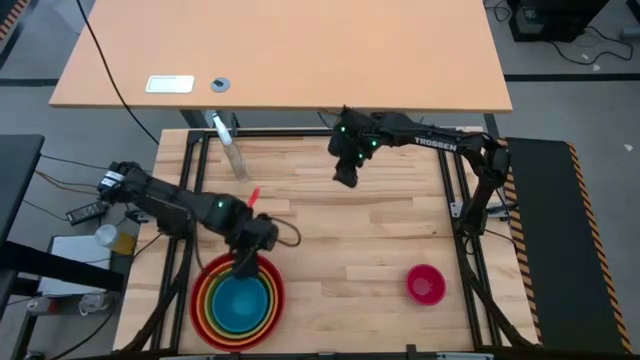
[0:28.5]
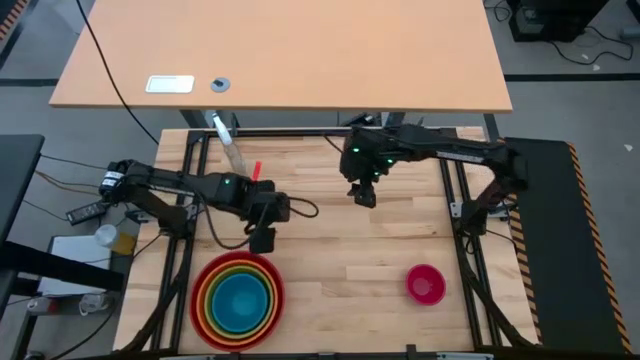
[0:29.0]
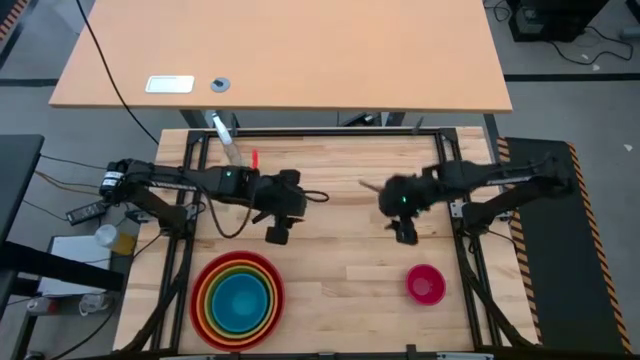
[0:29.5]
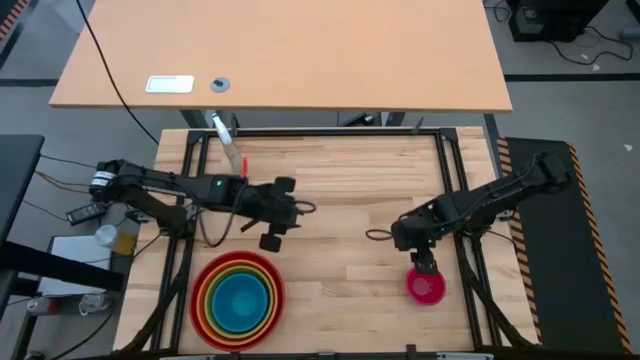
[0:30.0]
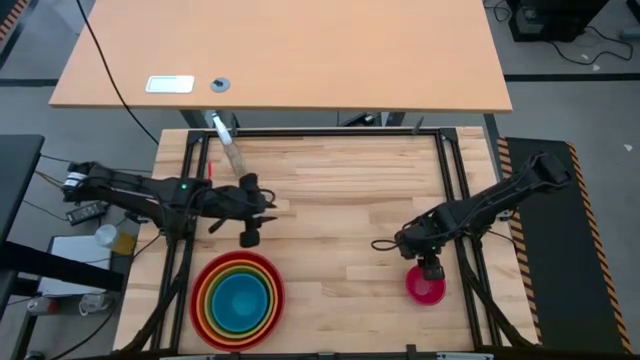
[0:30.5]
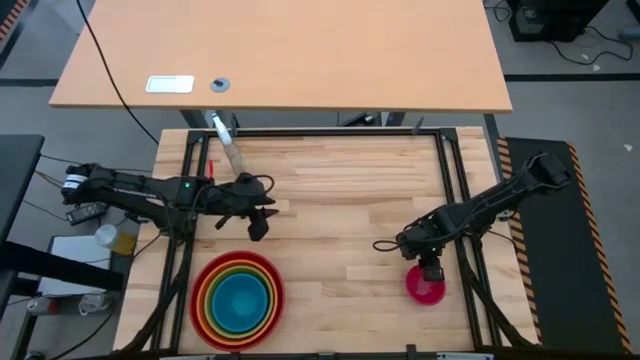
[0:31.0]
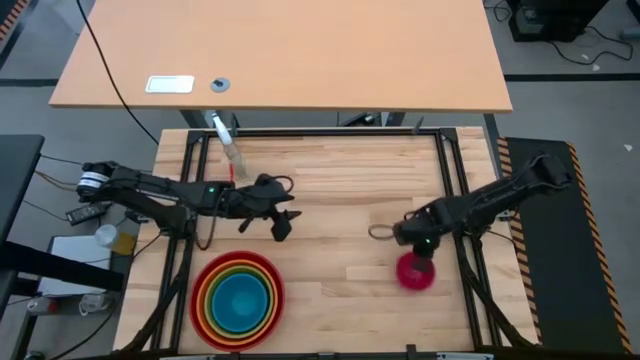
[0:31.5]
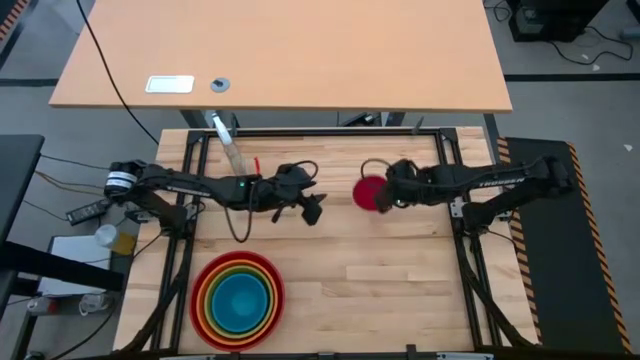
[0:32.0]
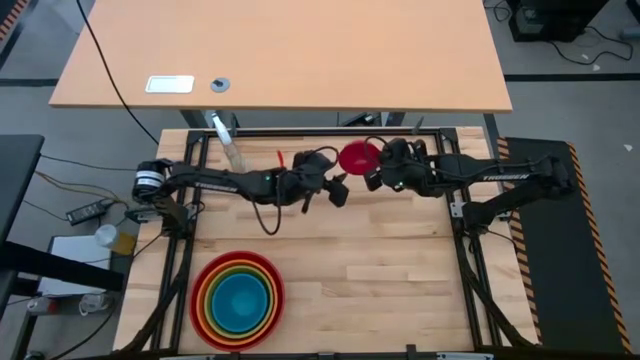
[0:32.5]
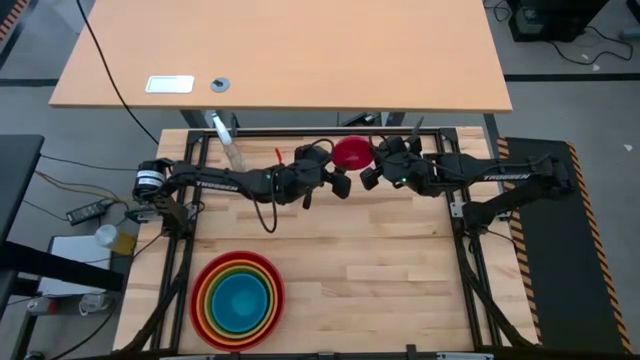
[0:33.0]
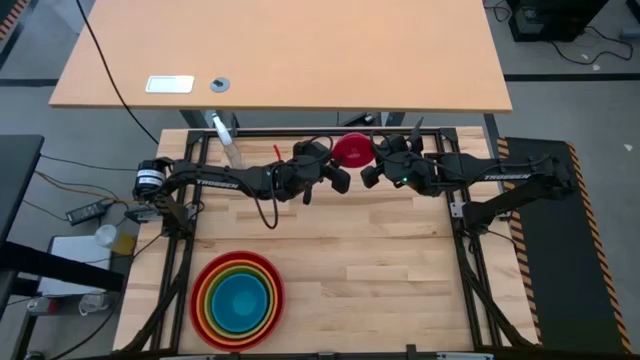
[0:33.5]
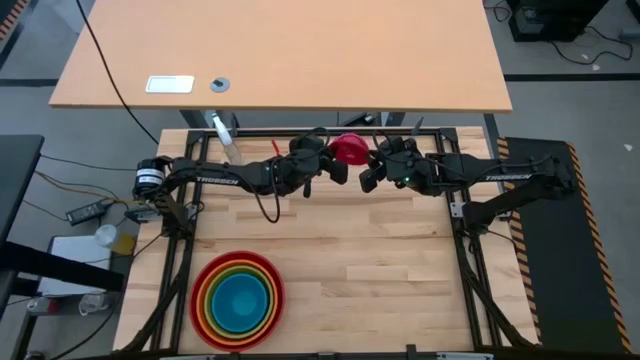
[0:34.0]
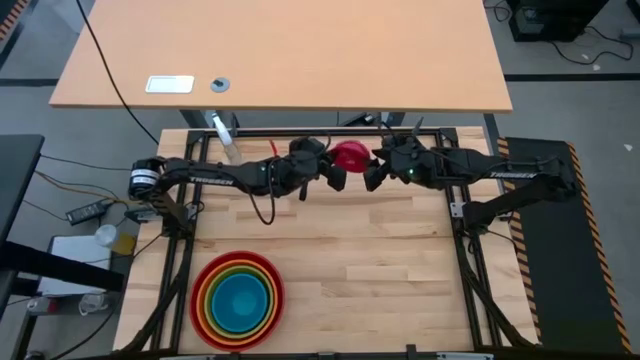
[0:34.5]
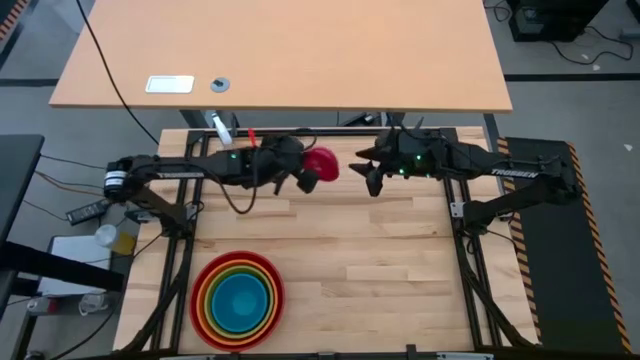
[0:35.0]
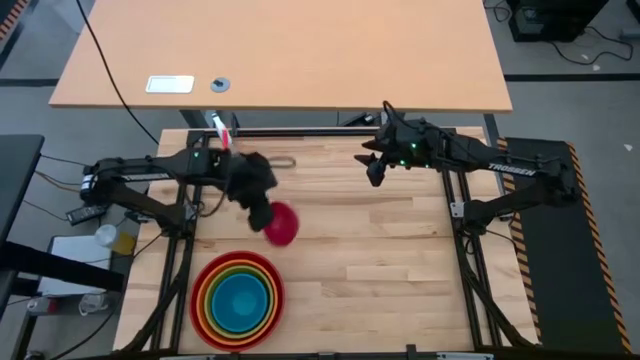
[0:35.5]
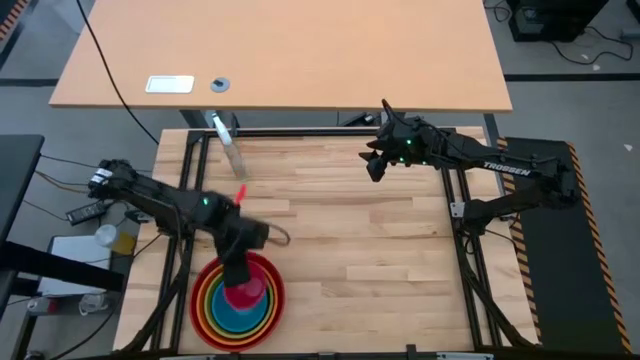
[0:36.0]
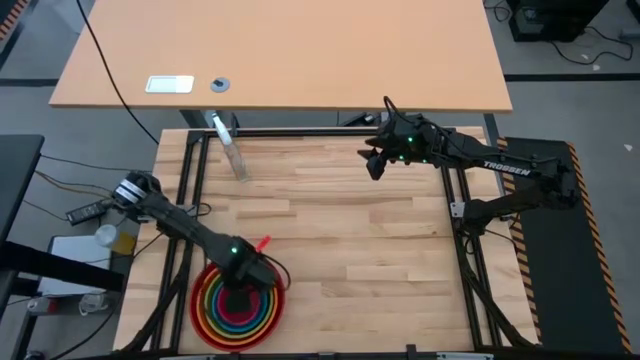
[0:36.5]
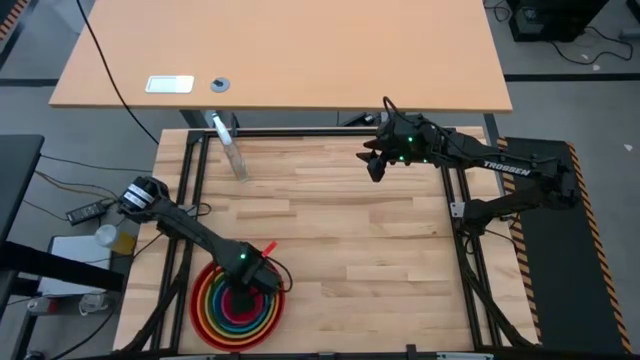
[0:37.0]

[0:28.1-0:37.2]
Stack the red bowl into the blue bowl

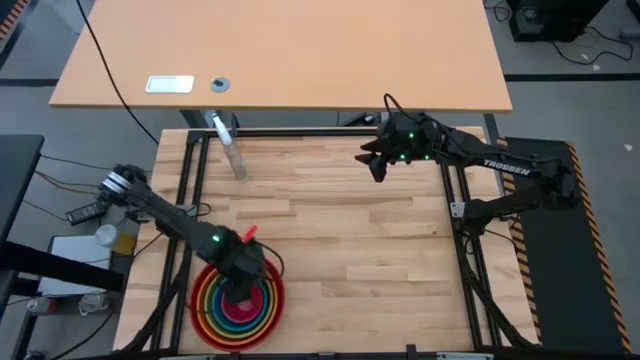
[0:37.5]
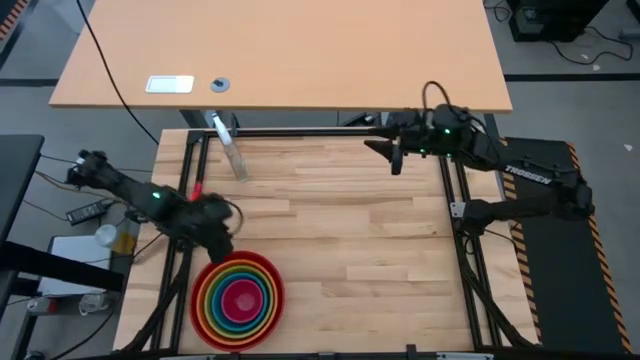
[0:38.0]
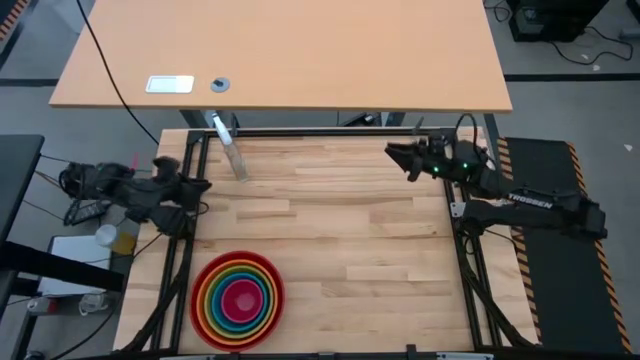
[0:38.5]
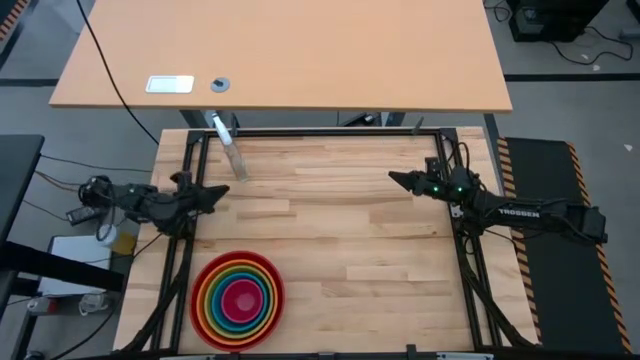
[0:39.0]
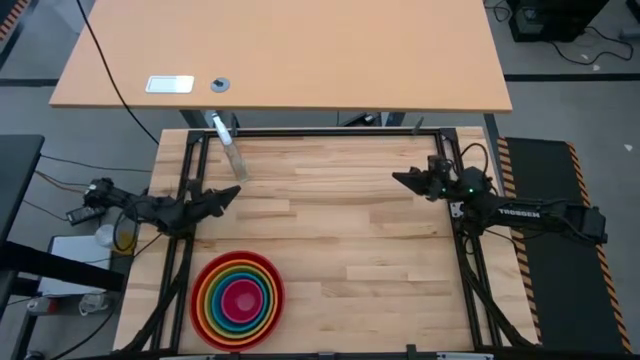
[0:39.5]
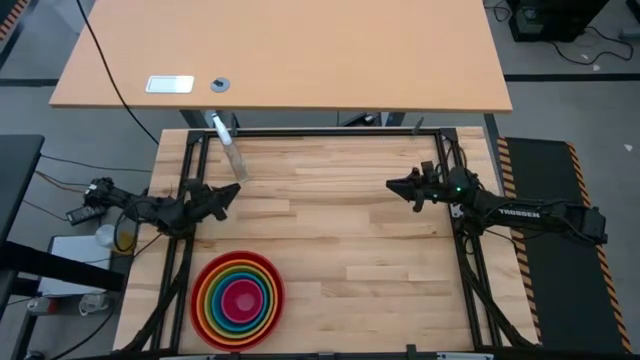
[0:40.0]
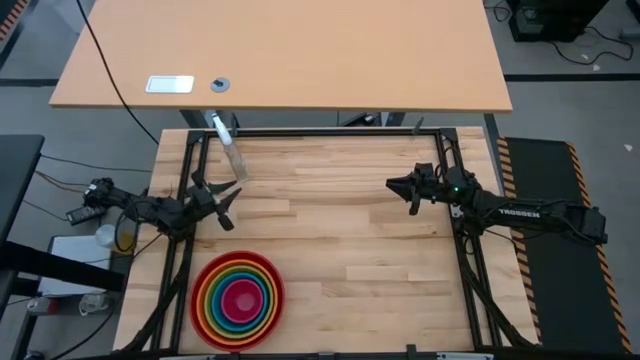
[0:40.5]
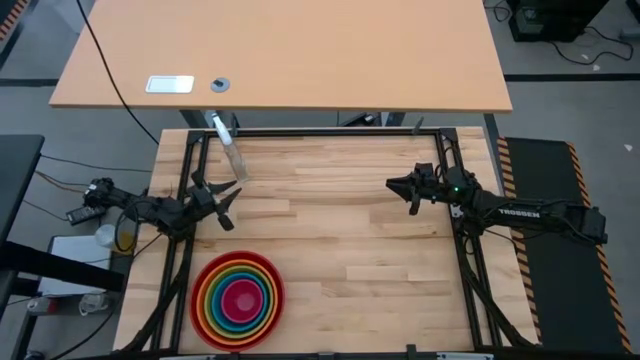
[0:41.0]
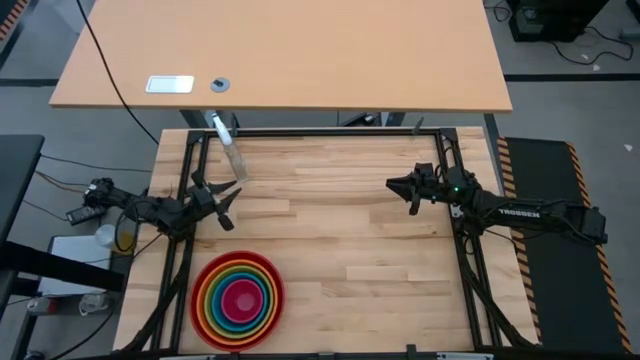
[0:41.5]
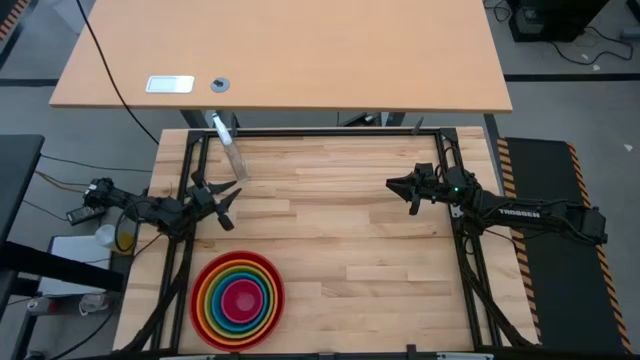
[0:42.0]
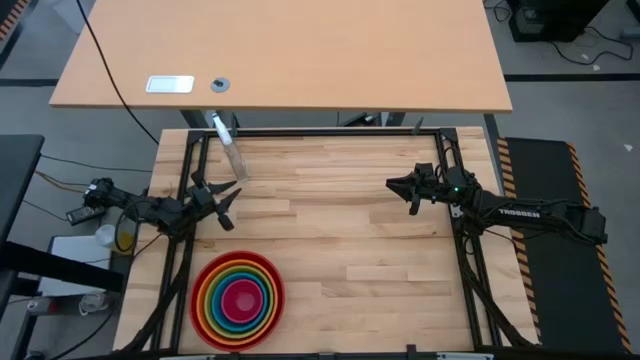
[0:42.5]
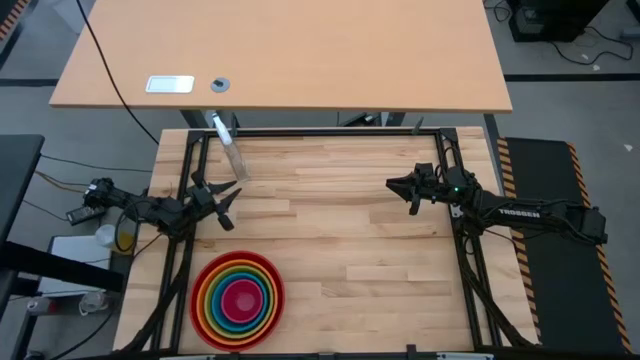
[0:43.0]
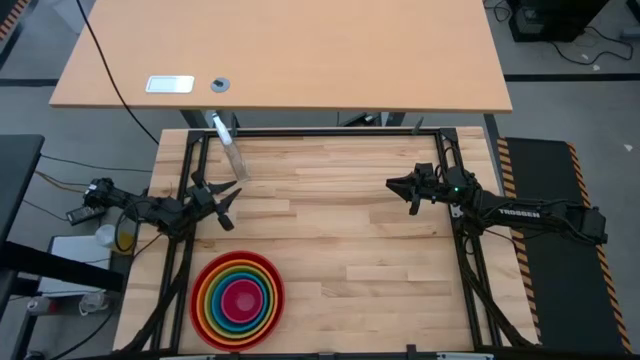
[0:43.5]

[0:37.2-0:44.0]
Return to Home Position

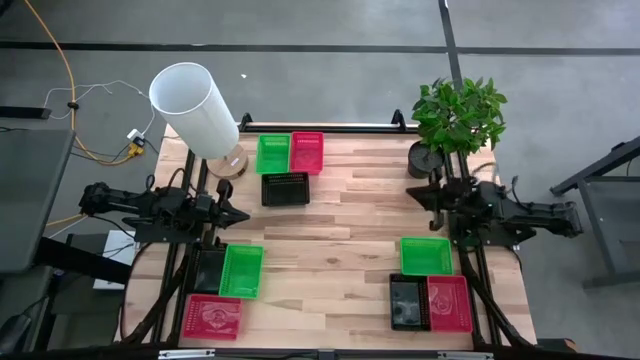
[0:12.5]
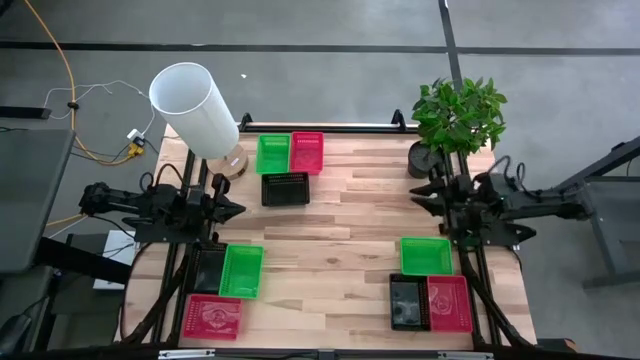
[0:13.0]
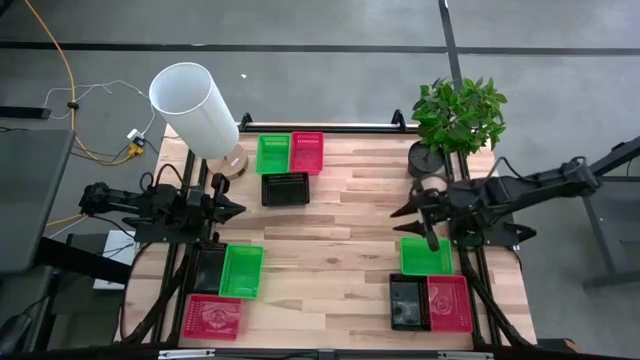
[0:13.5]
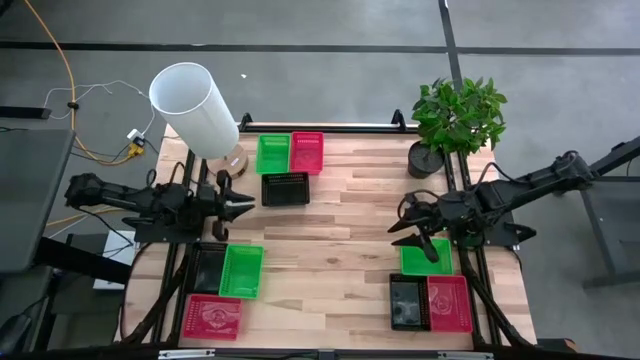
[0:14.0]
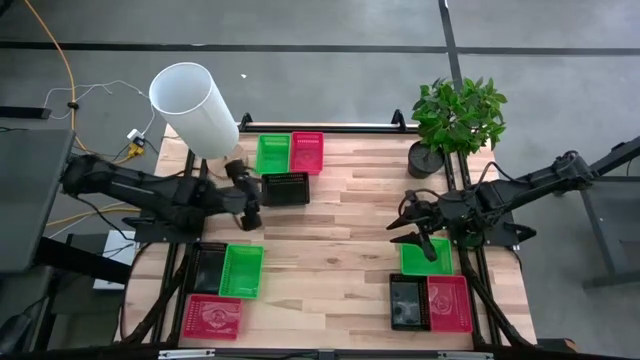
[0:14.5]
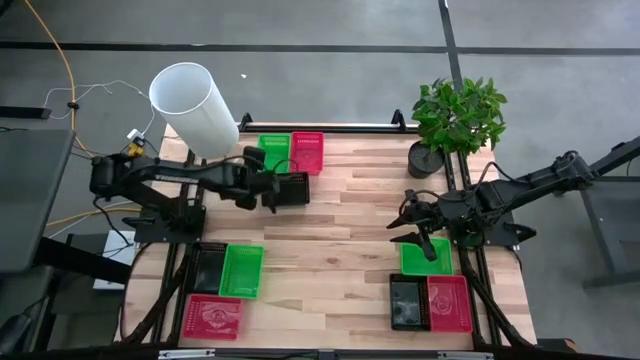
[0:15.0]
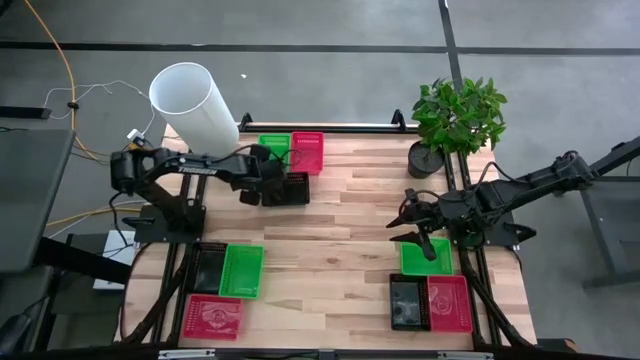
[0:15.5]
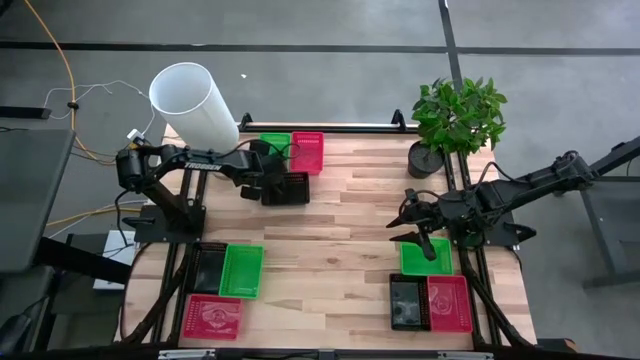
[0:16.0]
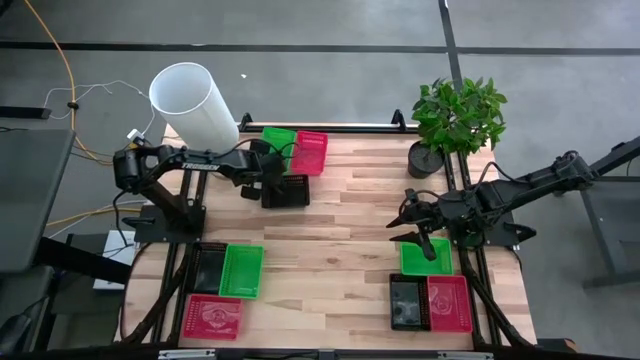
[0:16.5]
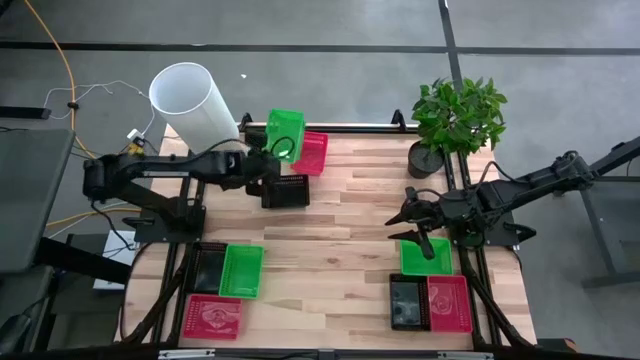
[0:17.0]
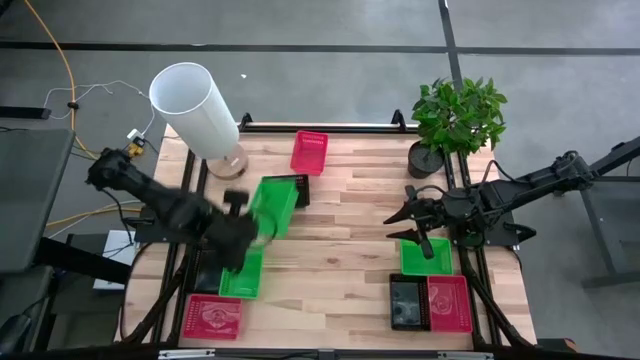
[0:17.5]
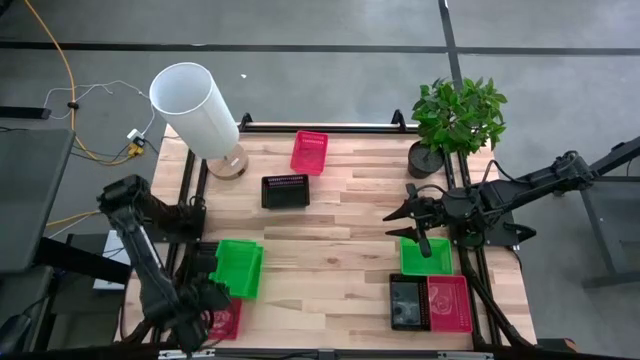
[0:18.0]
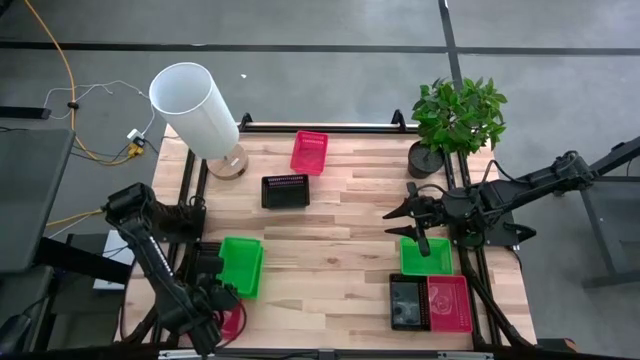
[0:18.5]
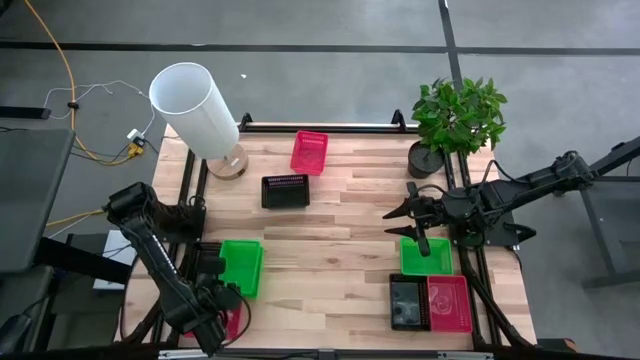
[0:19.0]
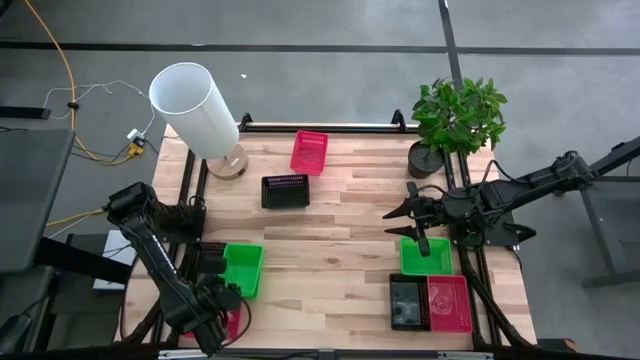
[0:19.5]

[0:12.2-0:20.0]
Stack the top green bin on top of the bottom left green bin
